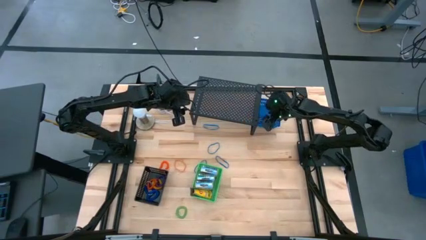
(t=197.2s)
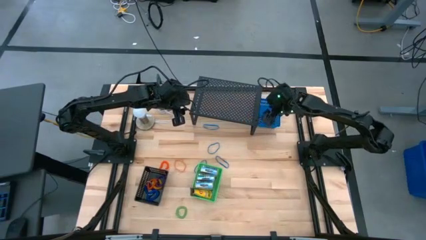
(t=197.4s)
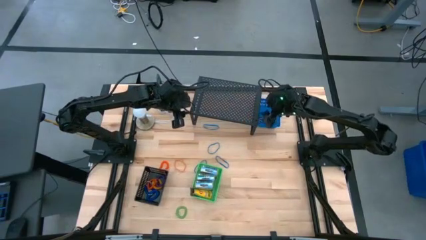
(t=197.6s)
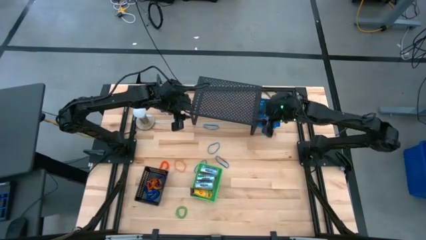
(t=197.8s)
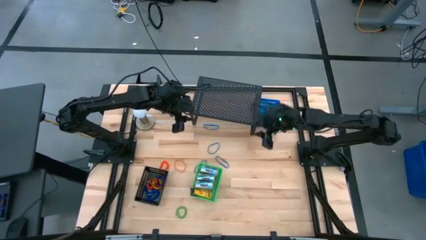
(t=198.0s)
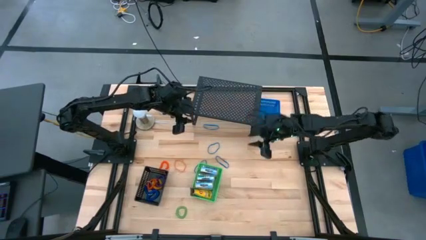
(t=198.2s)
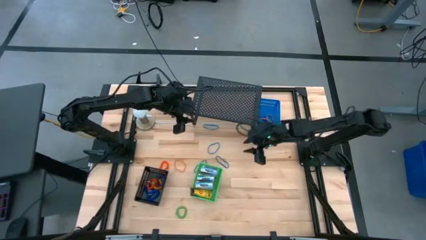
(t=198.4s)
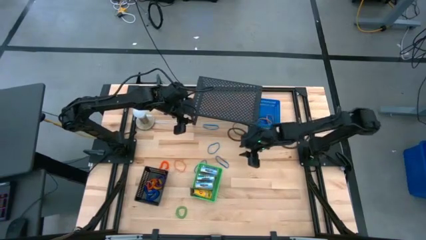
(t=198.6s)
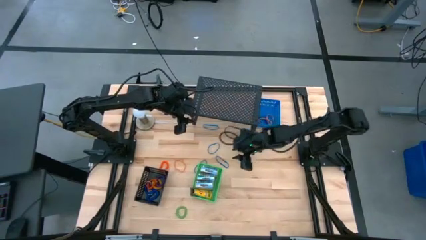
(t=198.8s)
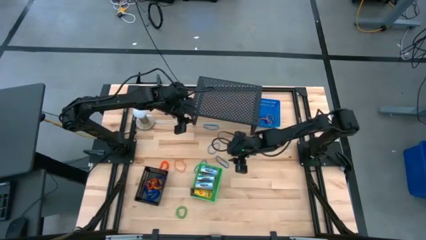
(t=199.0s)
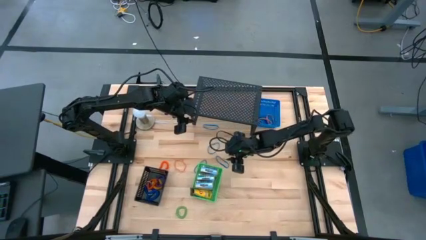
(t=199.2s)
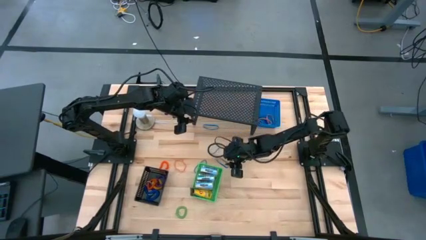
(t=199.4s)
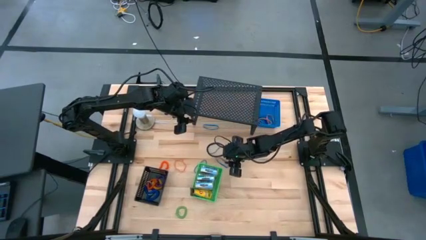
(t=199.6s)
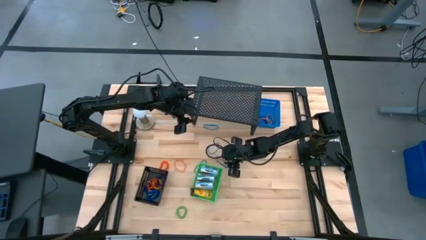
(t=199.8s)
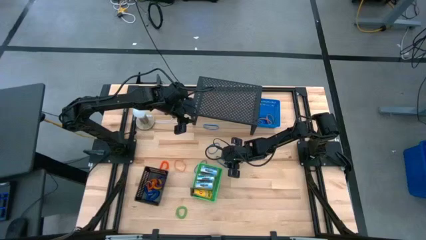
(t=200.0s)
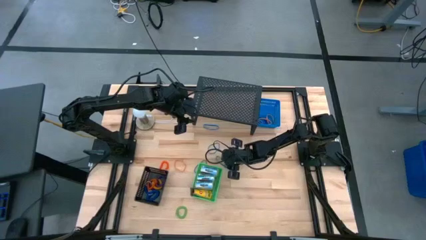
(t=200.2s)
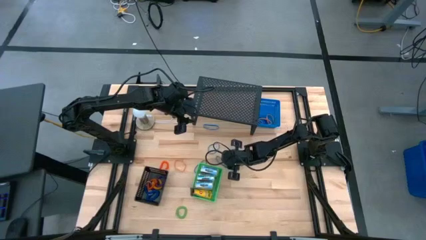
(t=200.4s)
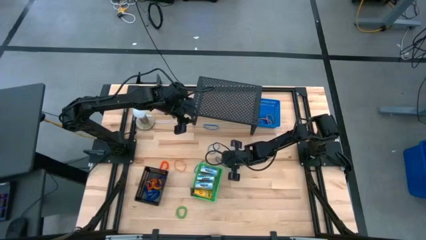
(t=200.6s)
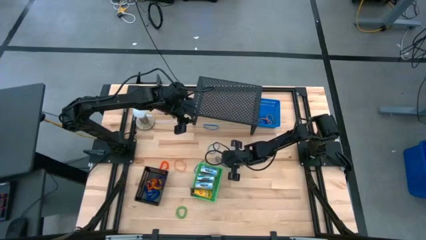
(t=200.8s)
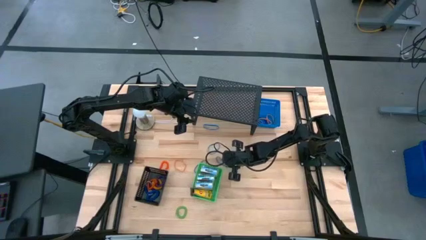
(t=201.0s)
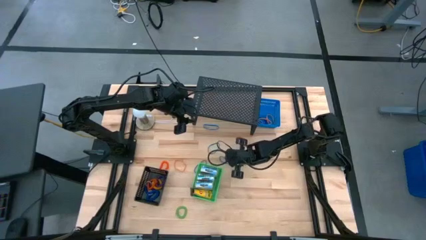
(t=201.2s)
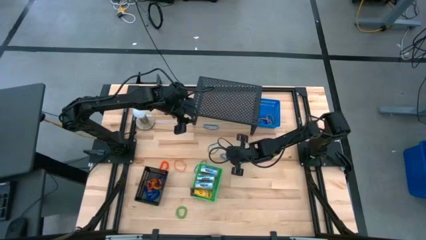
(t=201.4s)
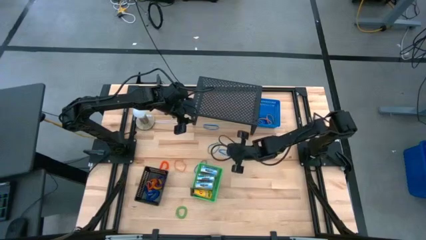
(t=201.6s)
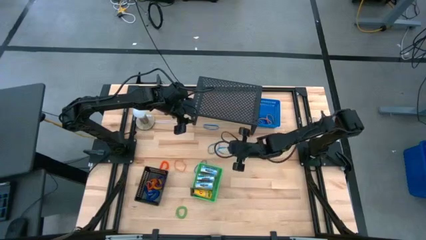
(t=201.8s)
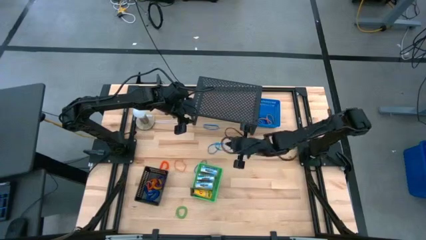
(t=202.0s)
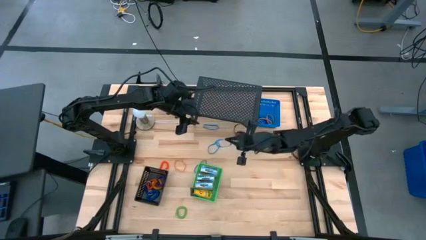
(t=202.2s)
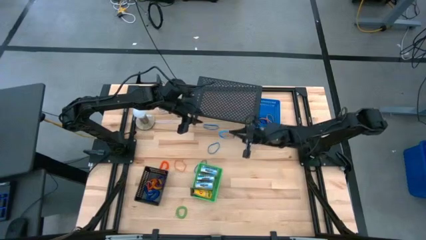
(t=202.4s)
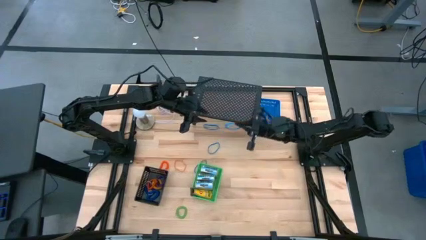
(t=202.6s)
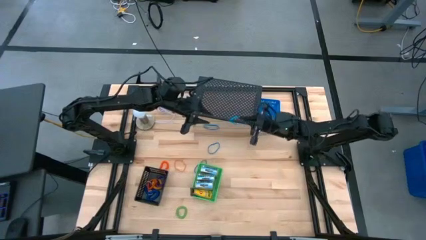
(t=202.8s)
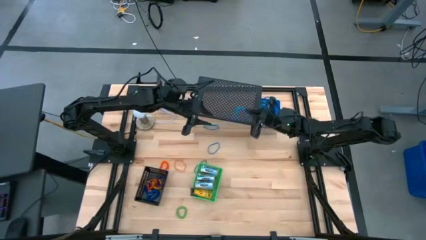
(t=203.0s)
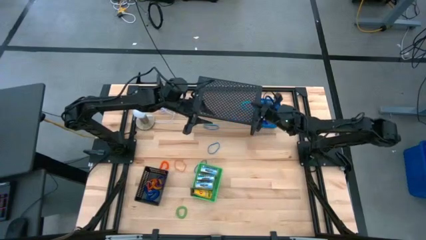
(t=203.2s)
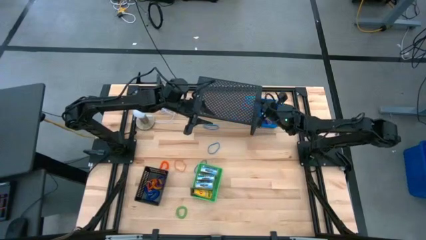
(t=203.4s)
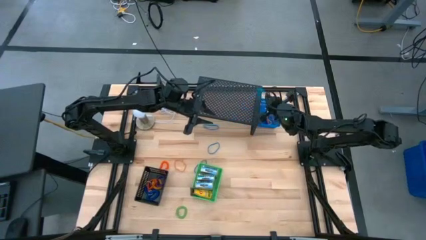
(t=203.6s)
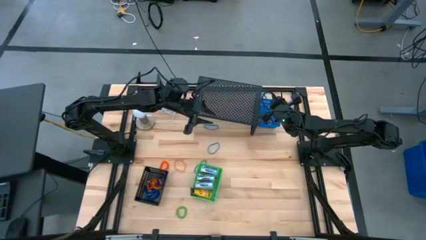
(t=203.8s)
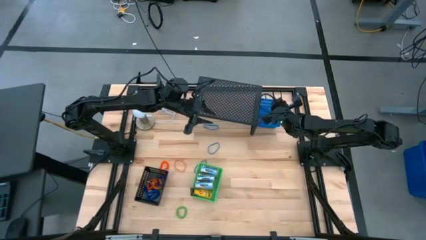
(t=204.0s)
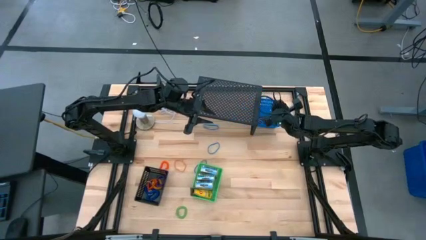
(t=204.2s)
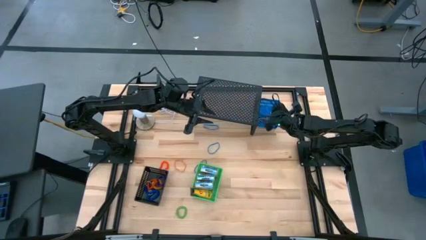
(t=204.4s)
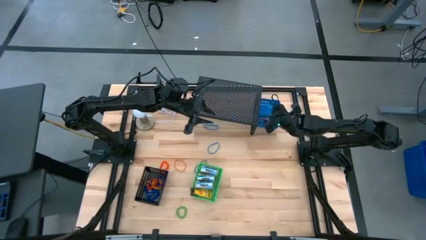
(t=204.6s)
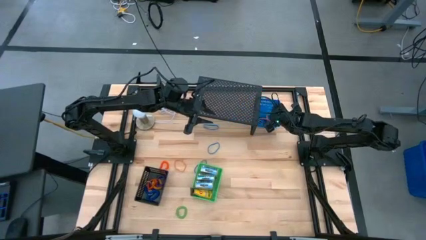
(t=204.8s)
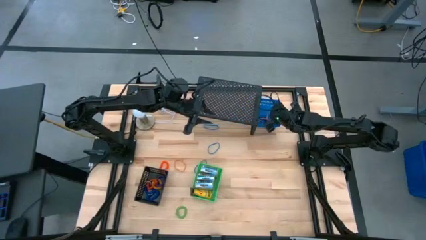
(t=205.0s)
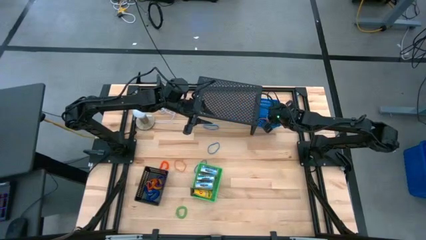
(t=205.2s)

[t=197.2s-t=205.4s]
Task: Pick & Place Office Desk Supplies
Put the blue rubberband into the blue bin

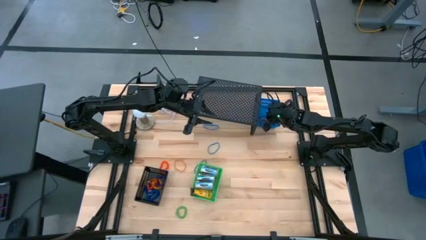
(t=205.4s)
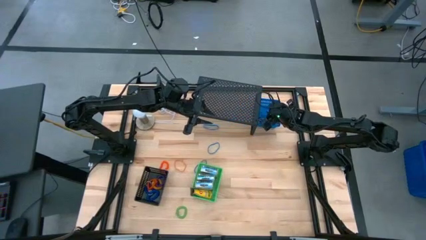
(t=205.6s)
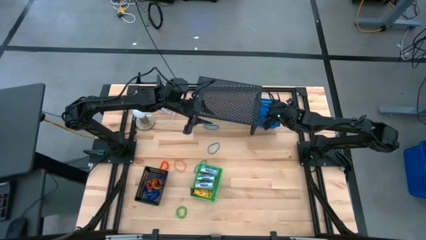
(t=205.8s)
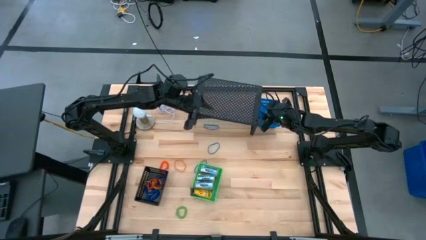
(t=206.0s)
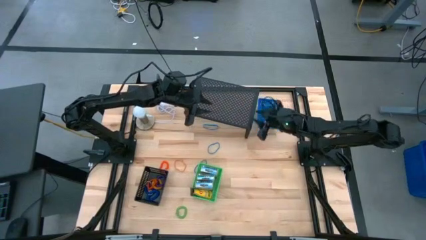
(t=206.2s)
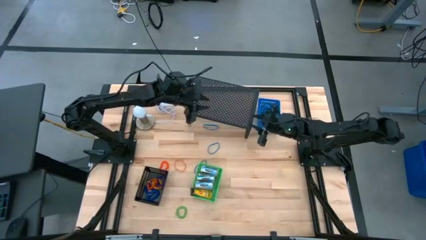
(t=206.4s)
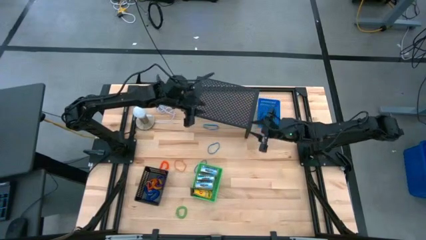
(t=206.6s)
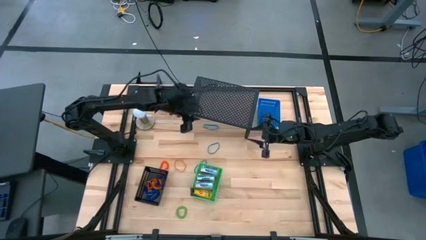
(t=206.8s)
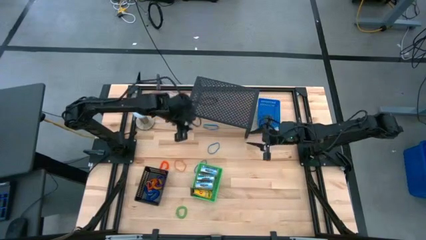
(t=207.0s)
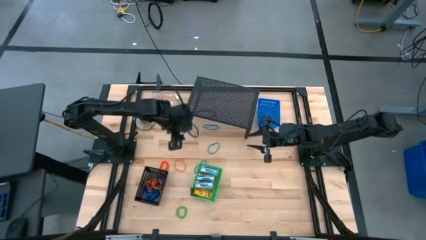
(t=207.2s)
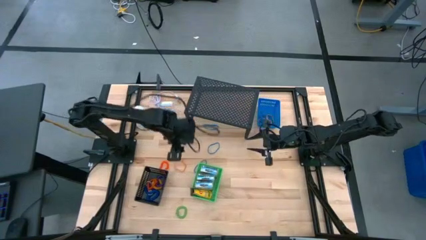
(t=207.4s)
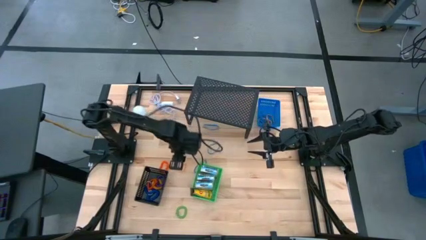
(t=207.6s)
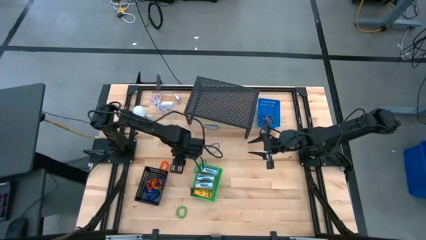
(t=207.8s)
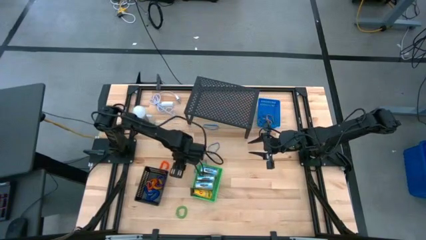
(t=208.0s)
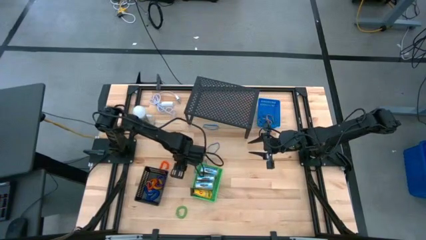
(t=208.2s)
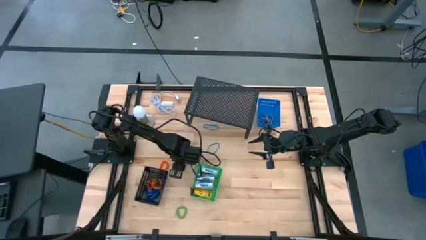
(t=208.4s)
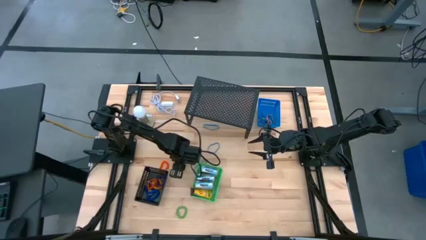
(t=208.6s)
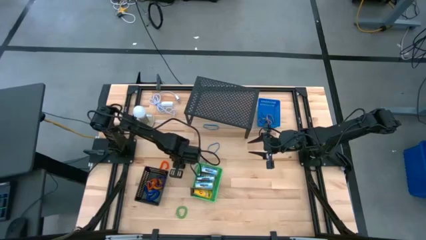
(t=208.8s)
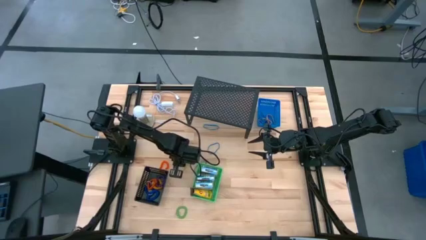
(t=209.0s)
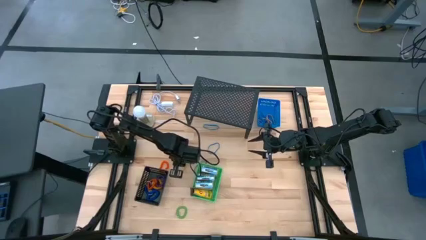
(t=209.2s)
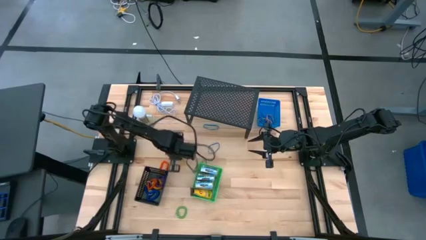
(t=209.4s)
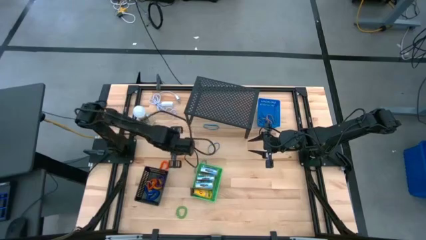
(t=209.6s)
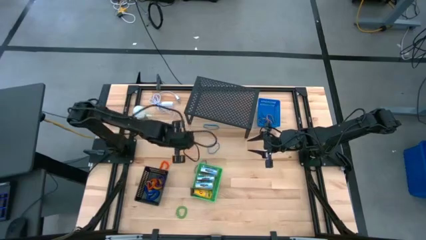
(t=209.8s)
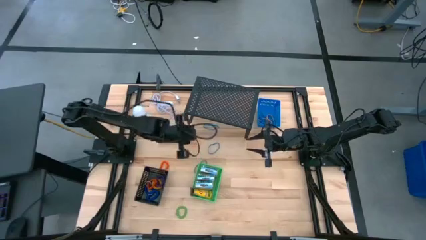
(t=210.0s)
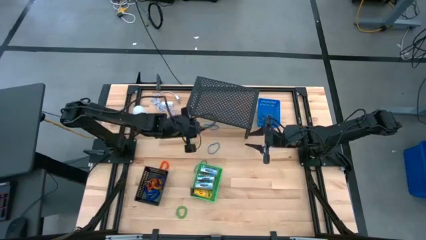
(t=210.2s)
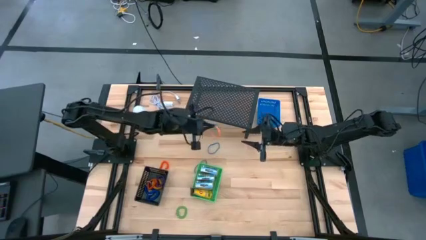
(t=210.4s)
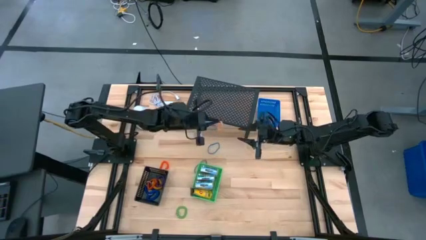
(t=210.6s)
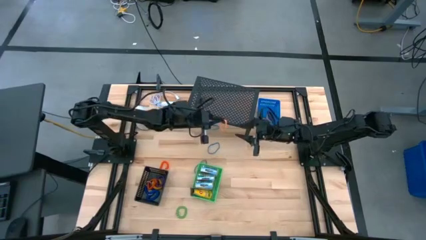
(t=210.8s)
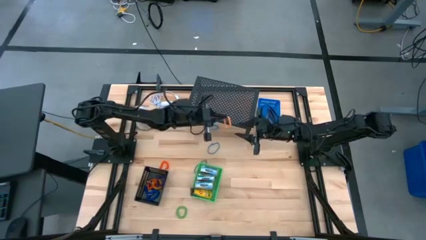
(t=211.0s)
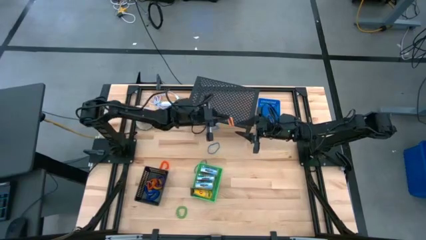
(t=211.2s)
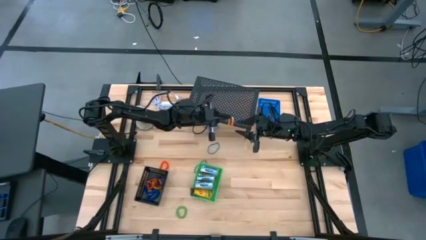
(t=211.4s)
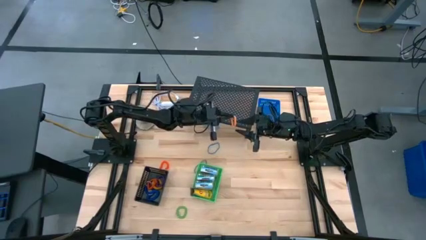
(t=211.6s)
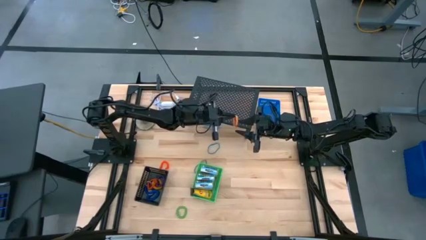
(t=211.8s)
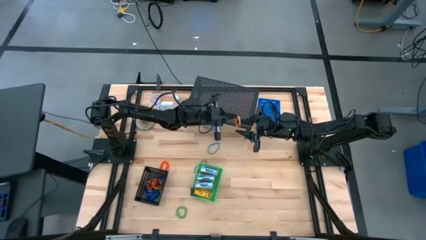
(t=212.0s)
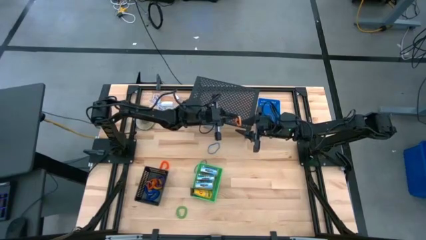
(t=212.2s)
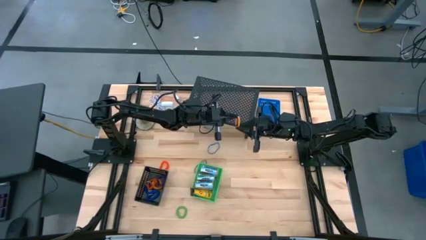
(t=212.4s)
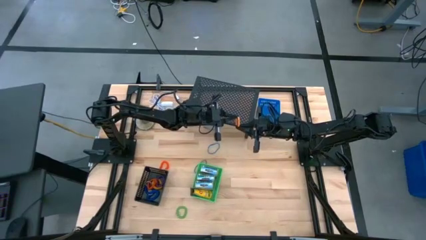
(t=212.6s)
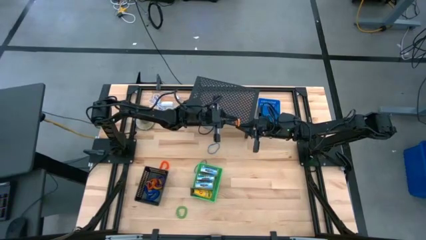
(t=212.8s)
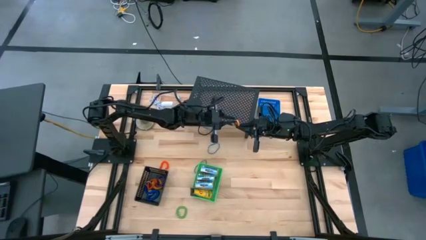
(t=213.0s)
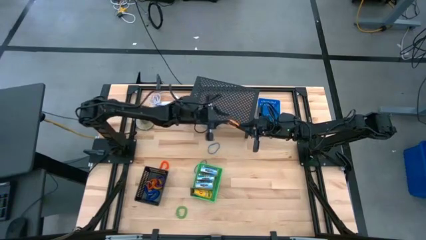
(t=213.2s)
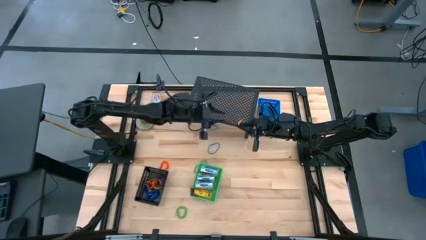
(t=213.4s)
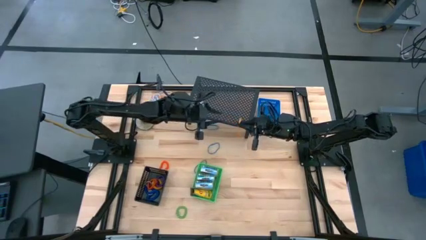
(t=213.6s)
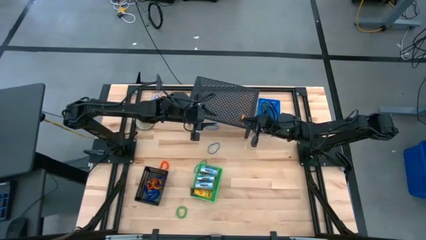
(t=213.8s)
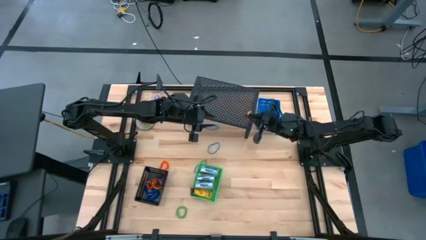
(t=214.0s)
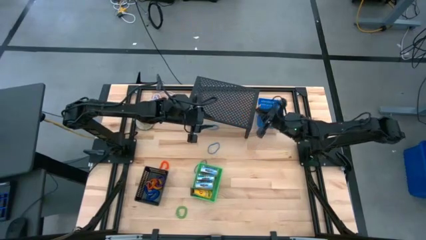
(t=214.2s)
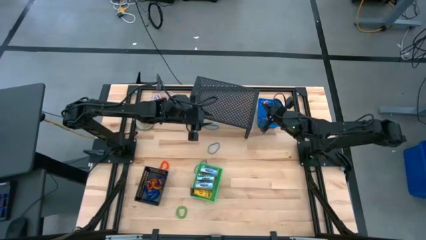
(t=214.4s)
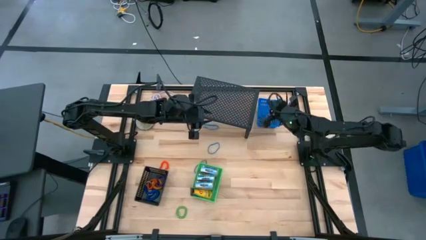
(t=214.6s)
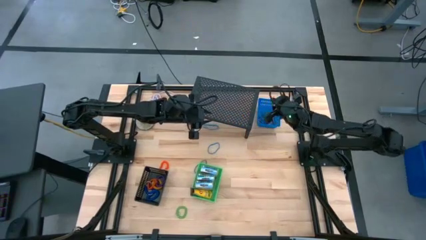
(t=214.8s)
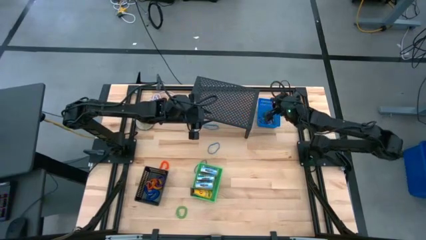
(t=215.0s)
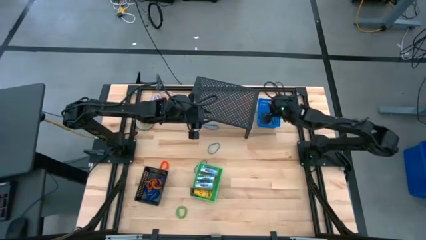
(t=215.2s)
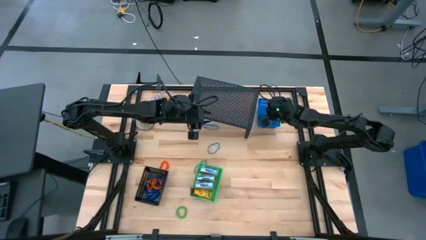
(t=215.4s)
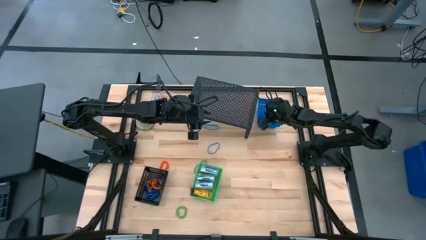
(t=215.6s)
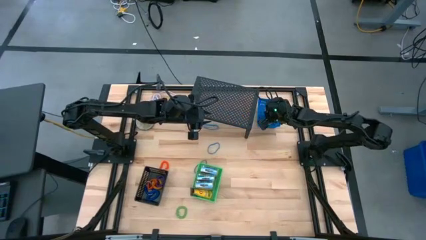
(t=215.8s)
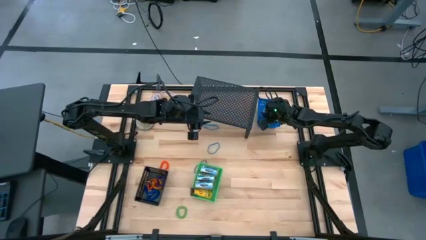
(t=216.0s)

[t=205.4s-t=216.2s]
Put the orange rubberband into the blue bin
